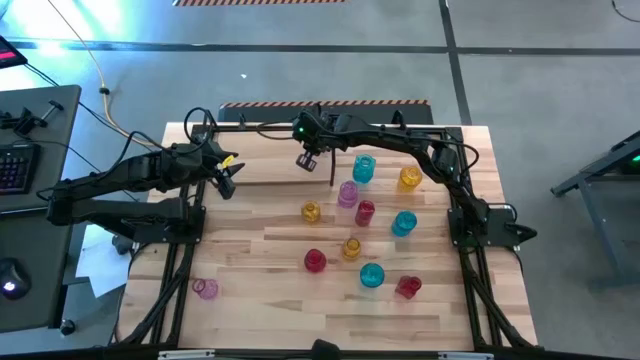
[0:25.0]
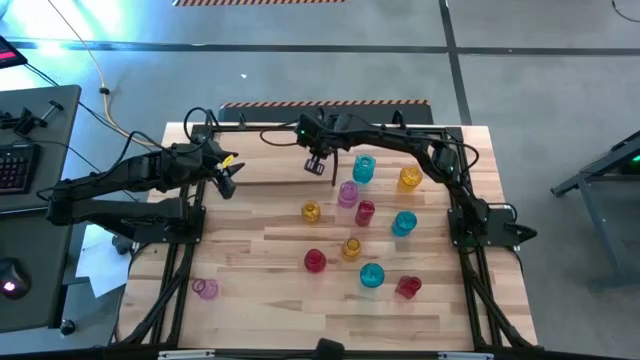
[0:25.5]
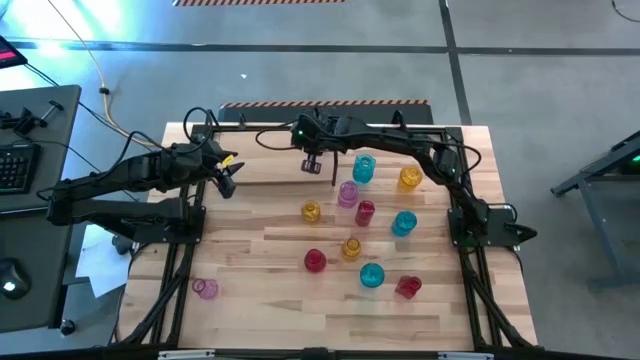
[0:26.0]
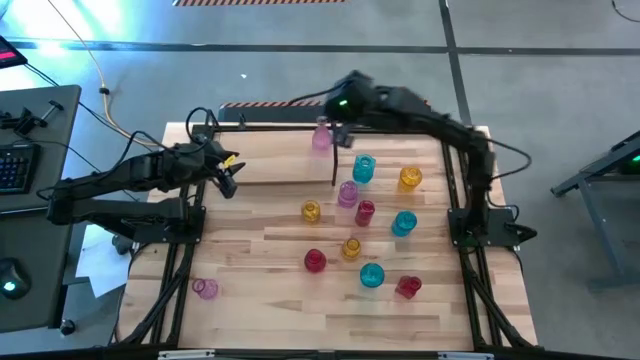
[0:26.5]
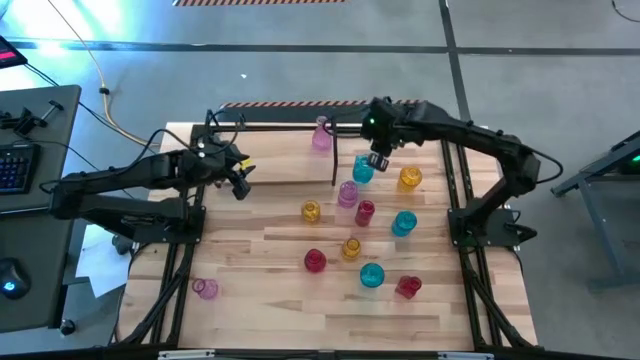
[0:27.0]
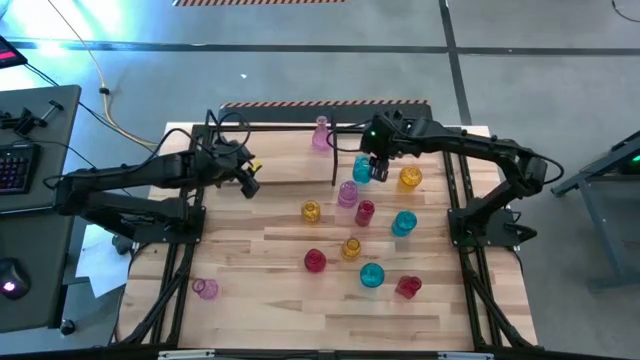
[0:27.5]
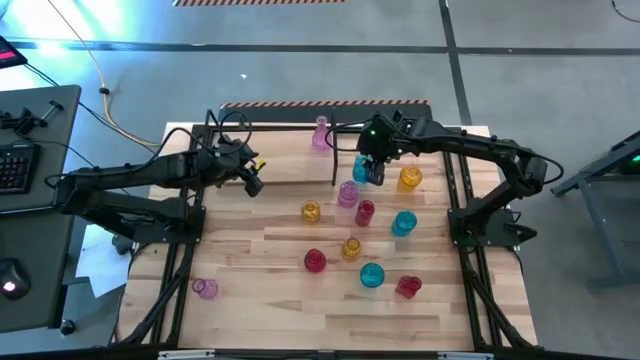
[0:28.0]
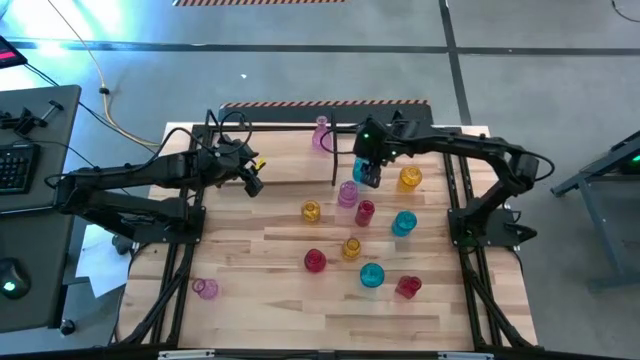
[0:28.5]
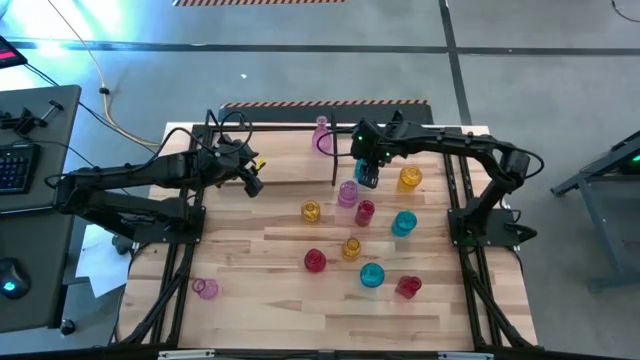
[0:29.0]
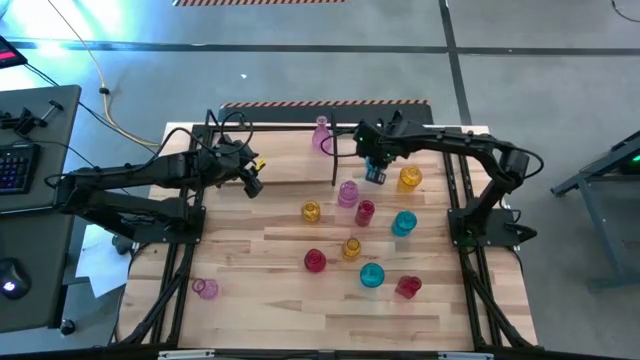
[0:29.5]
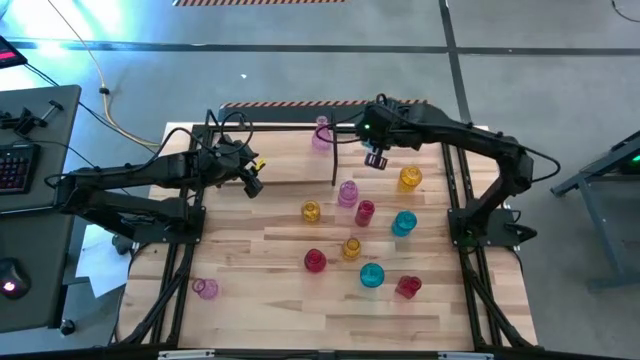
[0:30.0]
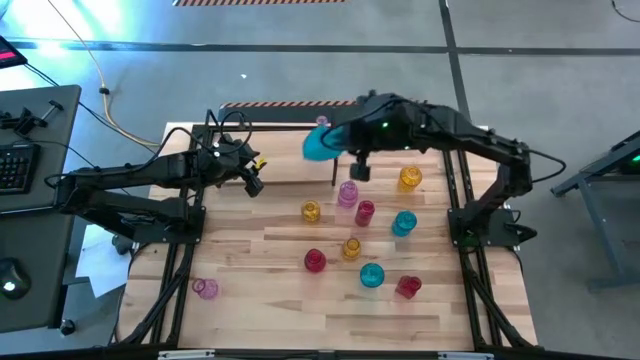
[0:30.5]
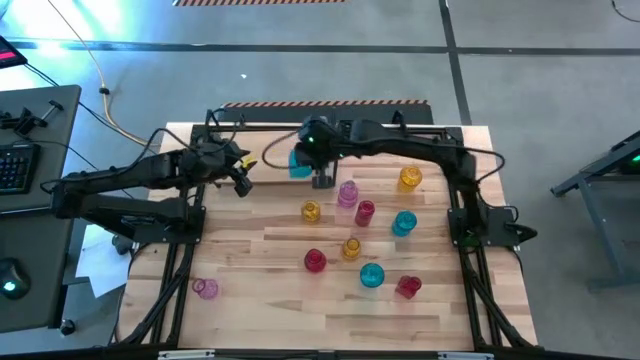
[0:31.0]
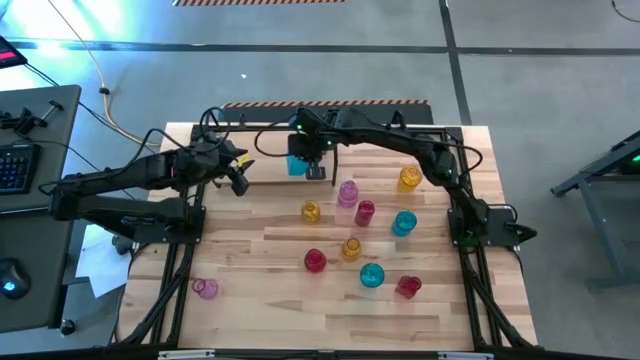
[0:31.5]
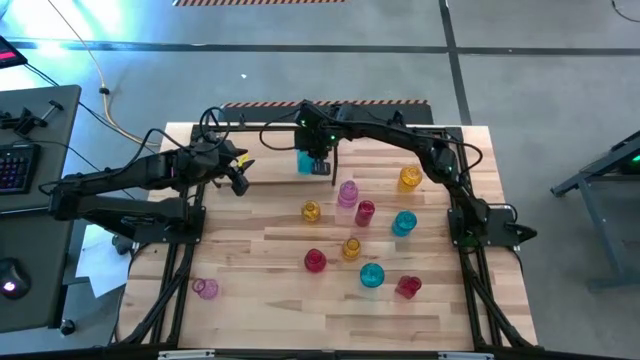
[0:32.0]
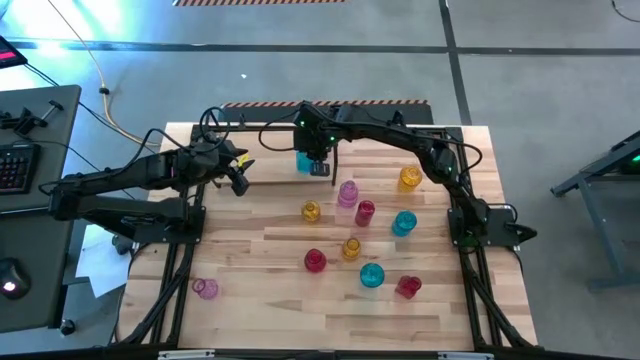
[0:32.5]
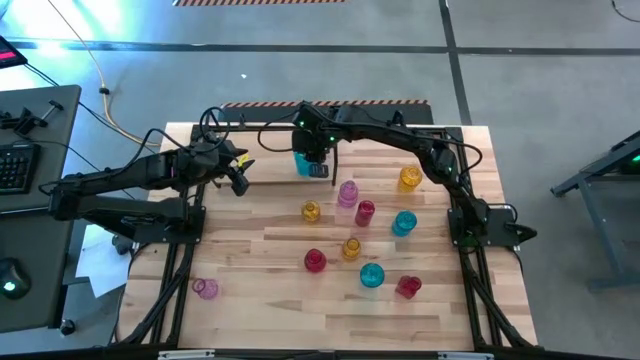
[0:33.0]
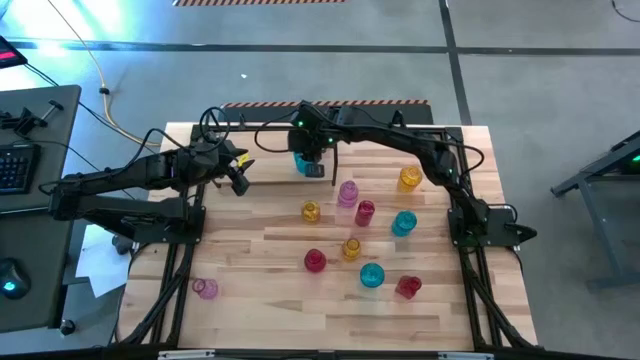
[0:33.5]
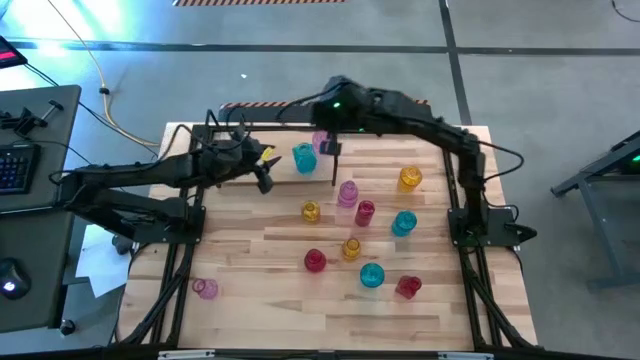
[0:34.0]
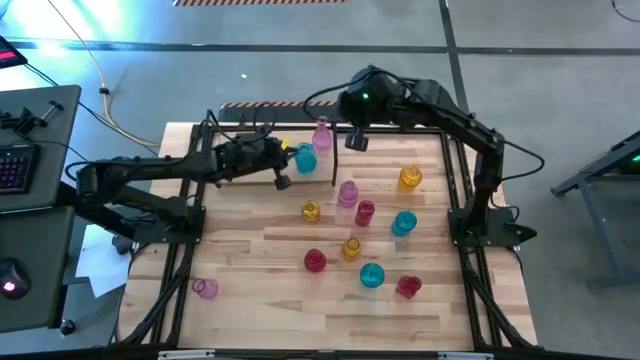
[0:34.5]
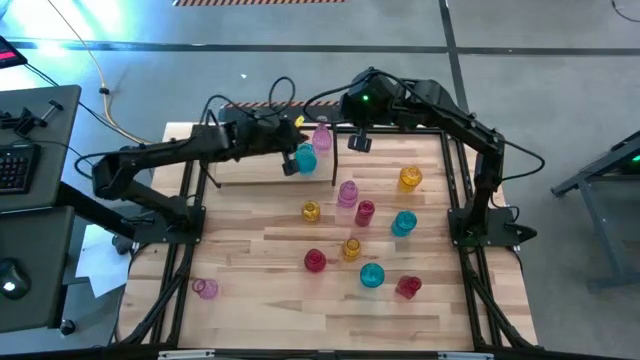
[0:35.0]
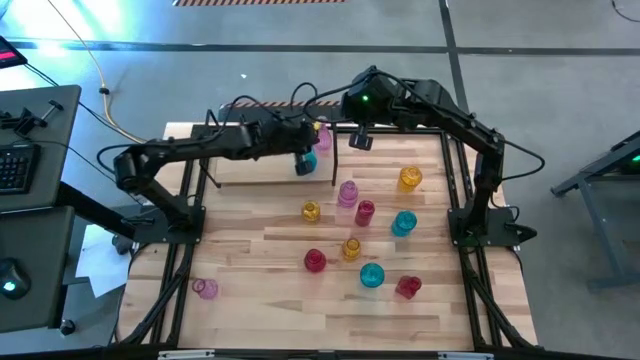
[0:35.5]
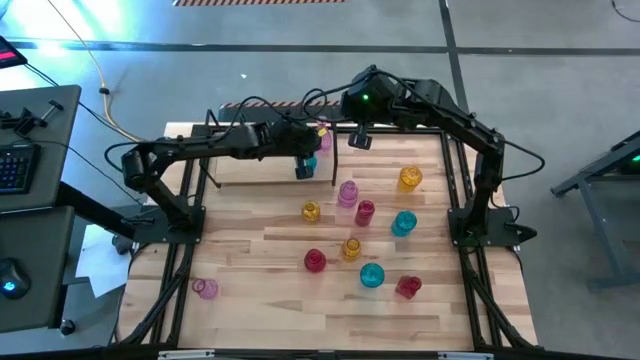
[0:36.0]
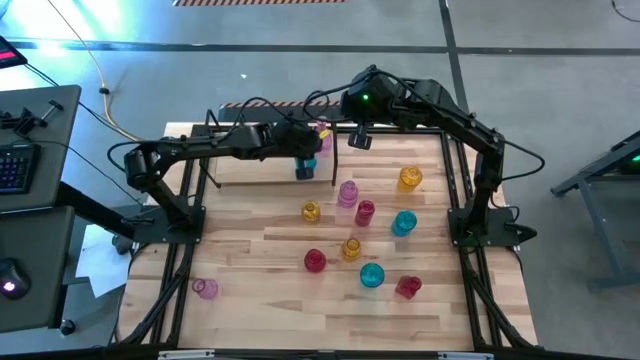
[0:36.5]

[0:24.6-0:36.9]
Task: sort vases onto shelf
Put the top left blue vase on the shelf

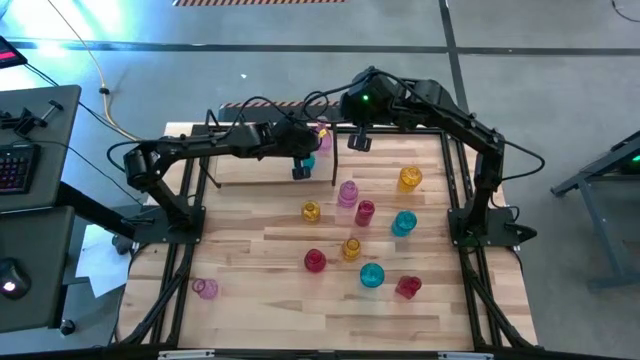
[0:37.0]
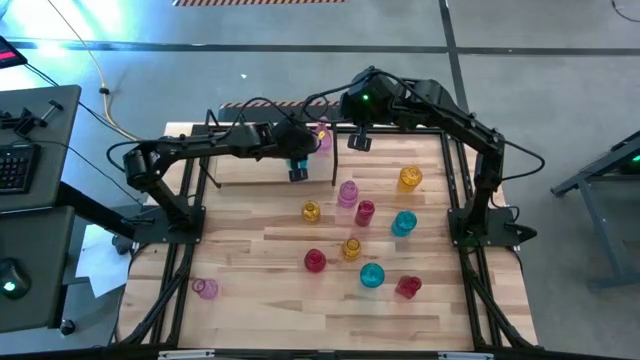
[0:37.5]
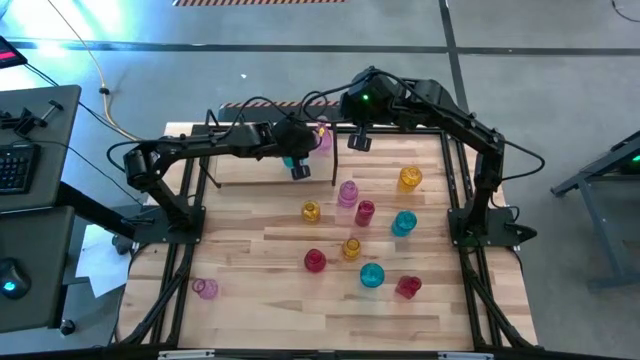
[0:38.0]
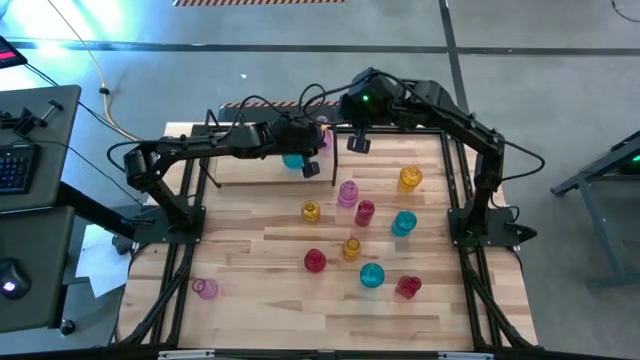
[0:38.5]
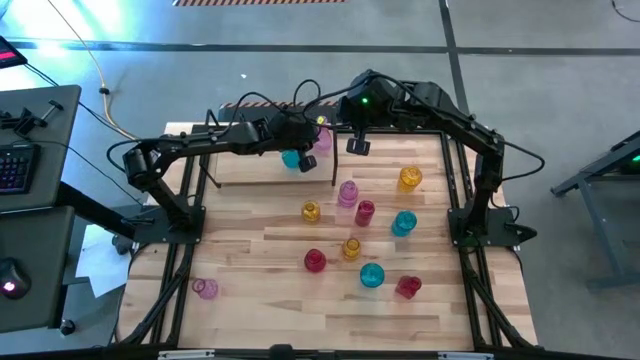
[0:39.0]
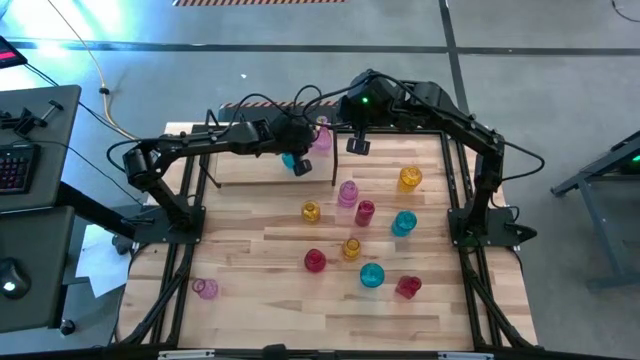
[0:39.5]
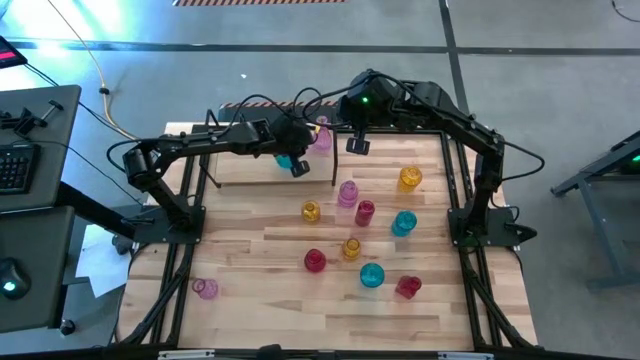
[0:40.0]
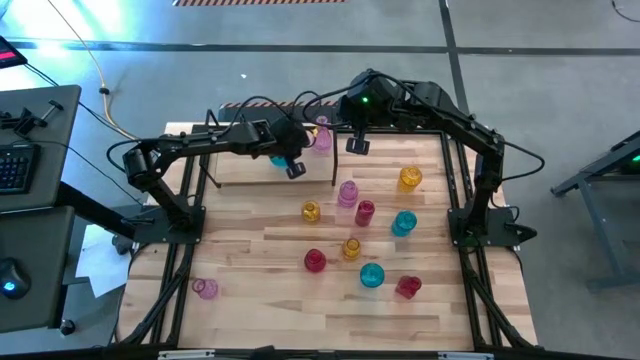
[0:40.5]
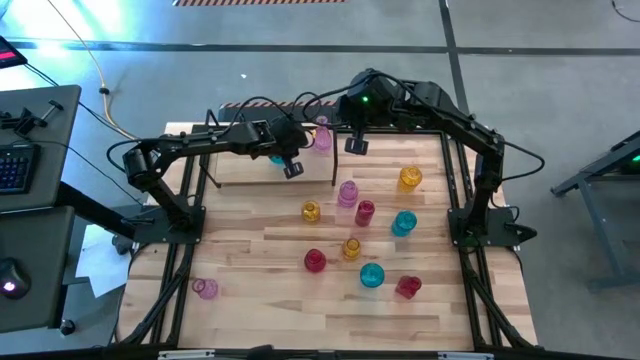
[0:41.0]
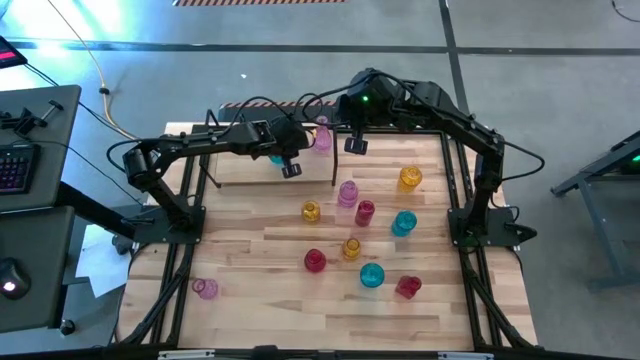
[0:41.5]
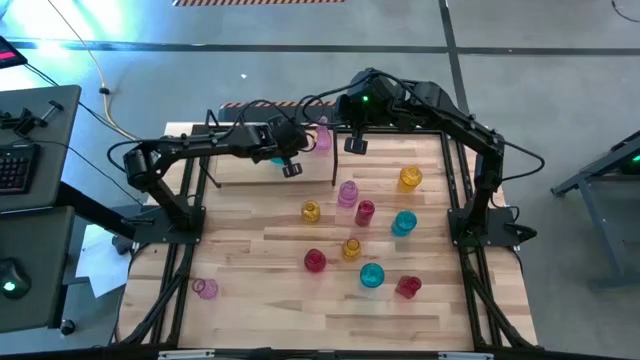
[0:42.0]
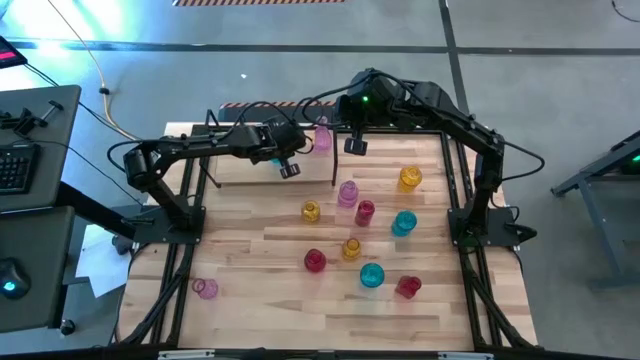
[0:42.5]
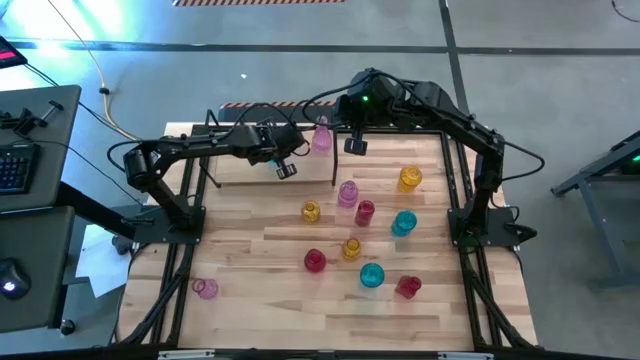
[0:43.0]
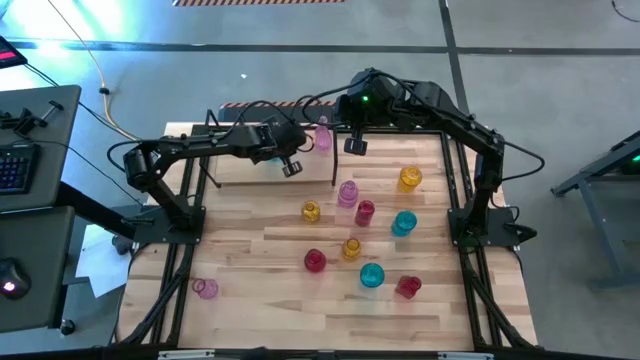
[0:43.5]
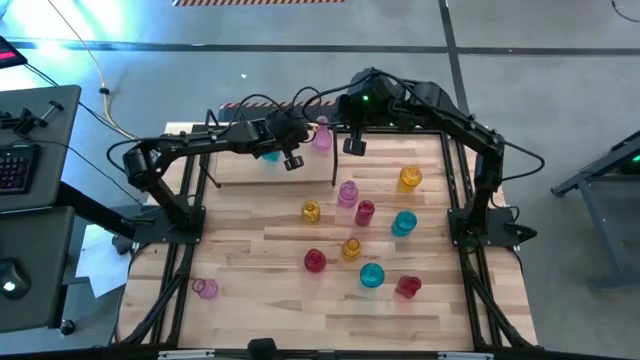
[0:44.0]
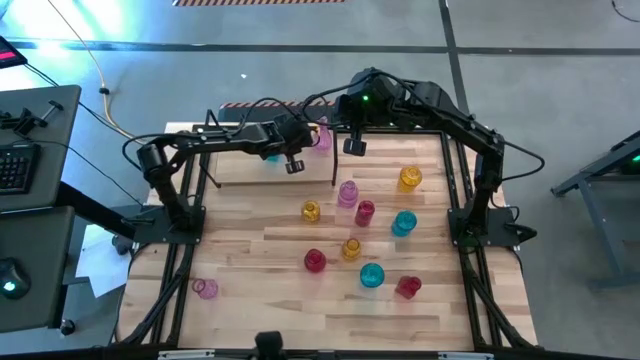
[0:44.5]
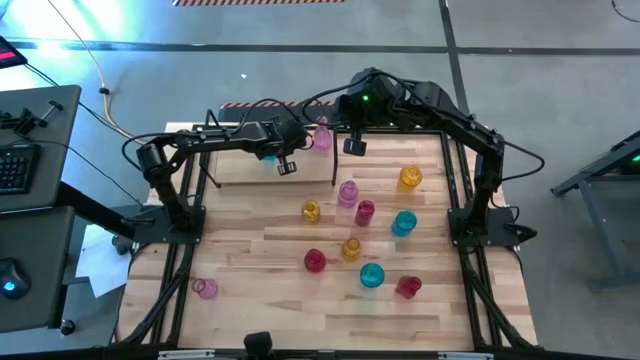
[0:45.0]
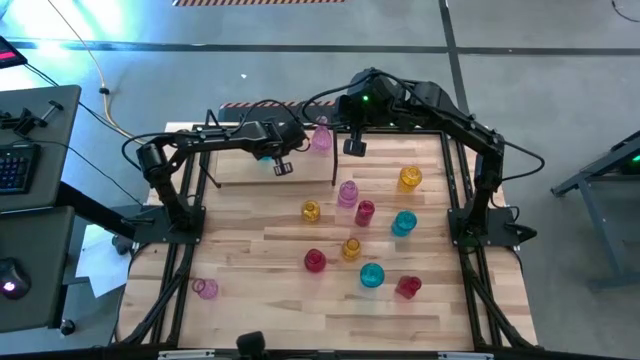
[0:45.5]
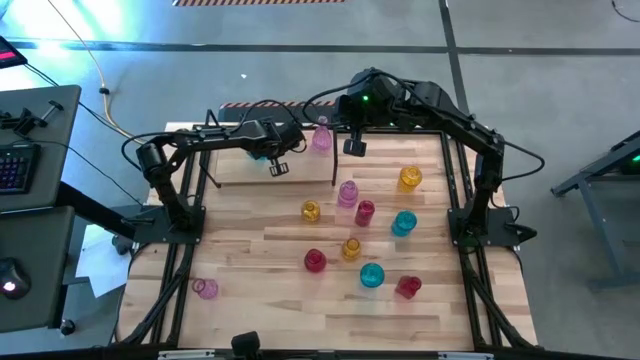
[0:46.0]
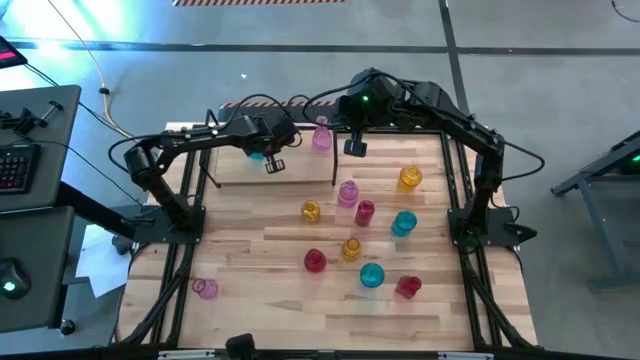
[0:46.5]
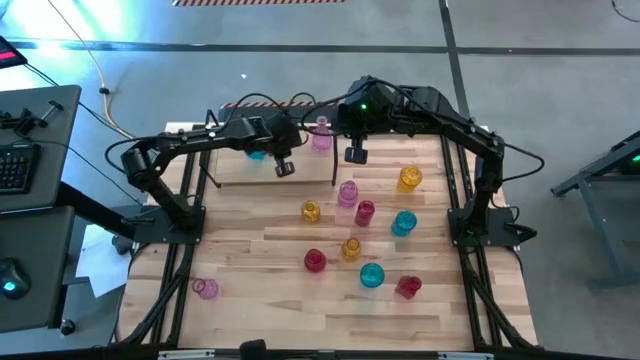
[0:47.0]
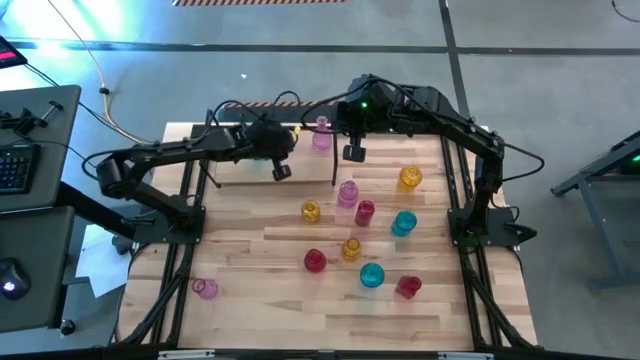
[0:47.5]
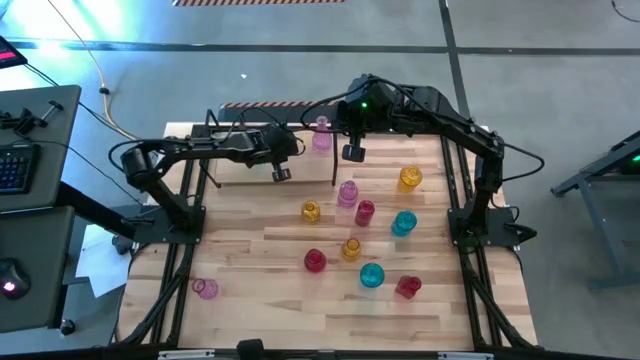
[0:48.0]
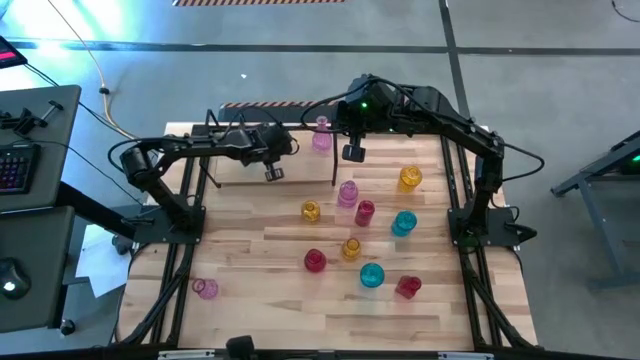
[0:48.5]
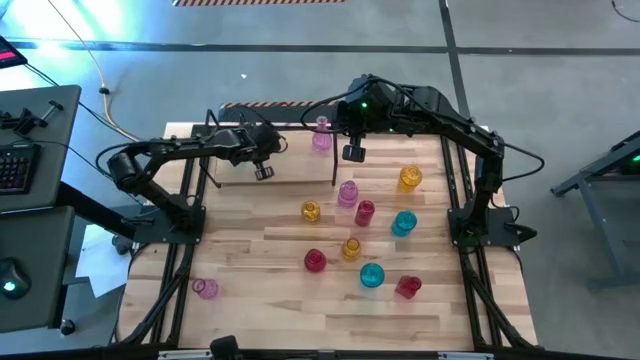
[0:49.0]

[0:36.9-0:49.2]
Put the top left blue vase on the shelf
